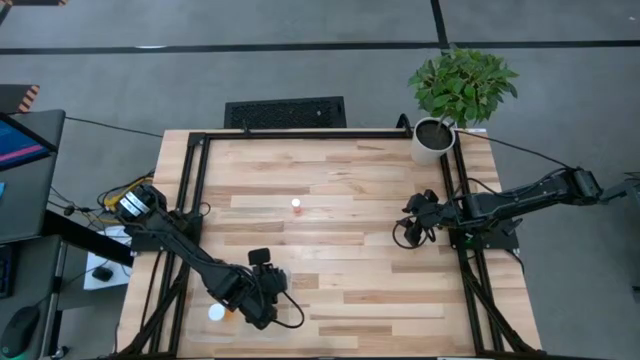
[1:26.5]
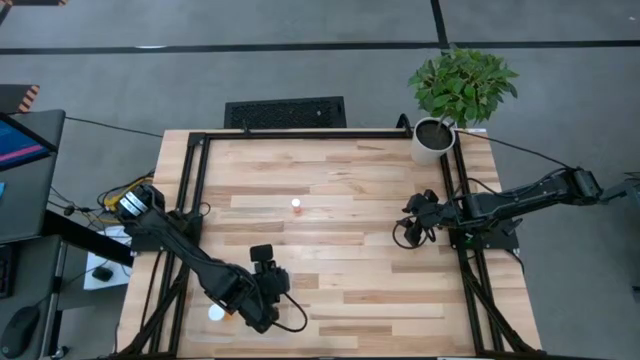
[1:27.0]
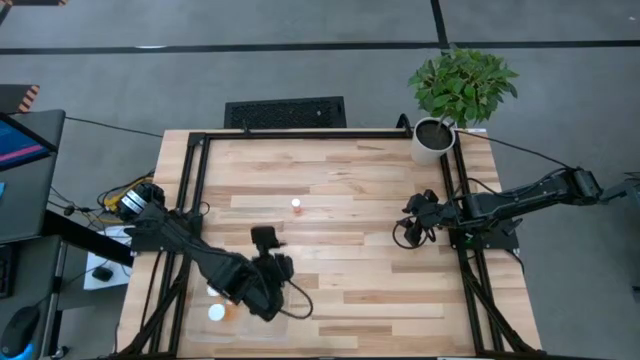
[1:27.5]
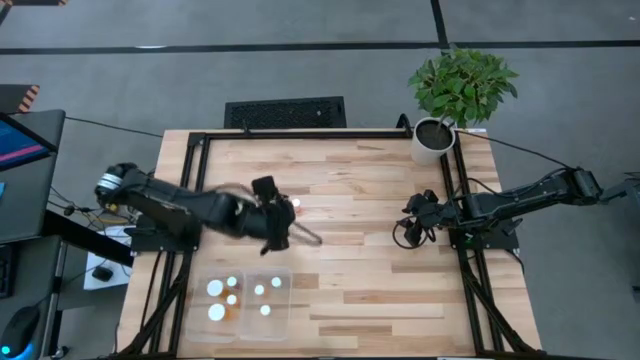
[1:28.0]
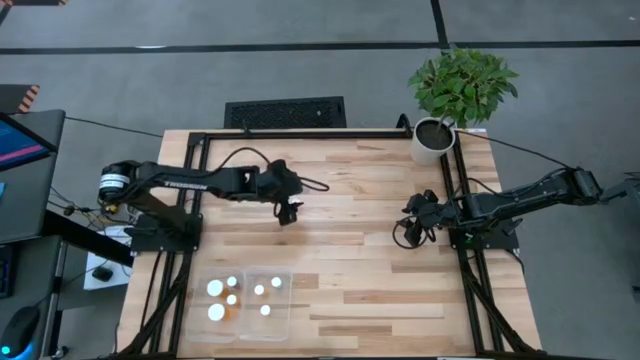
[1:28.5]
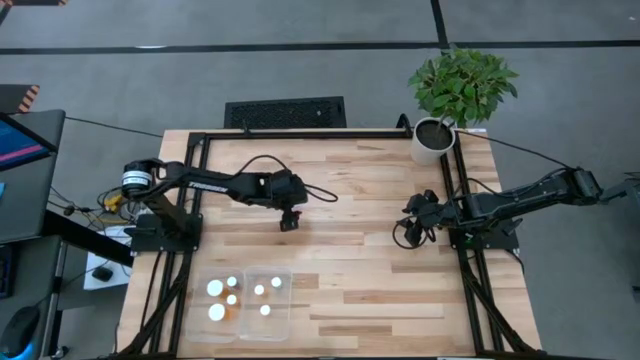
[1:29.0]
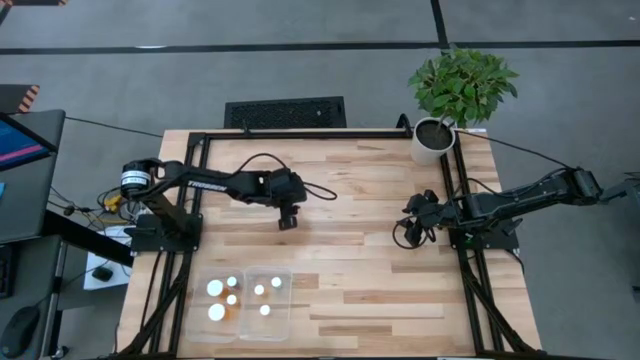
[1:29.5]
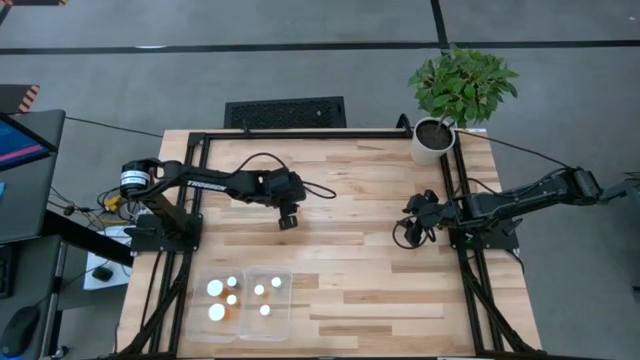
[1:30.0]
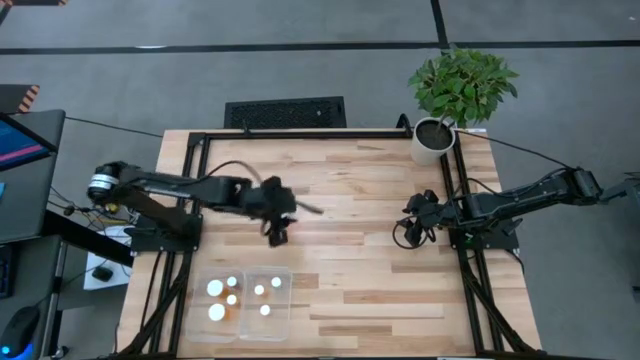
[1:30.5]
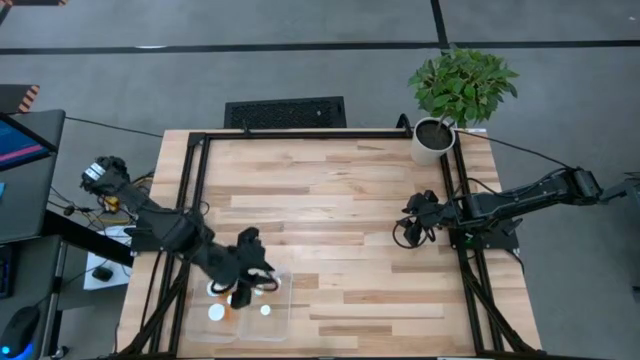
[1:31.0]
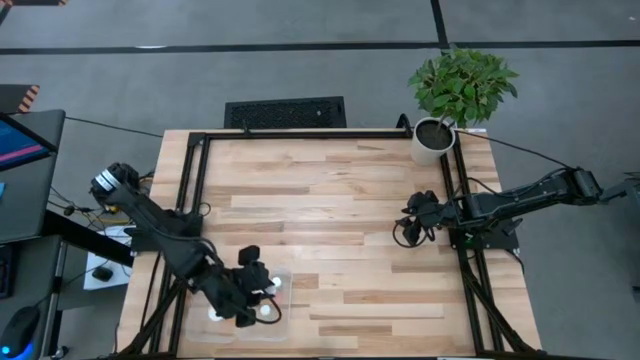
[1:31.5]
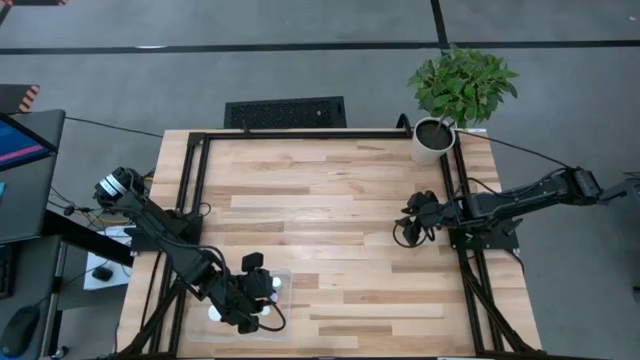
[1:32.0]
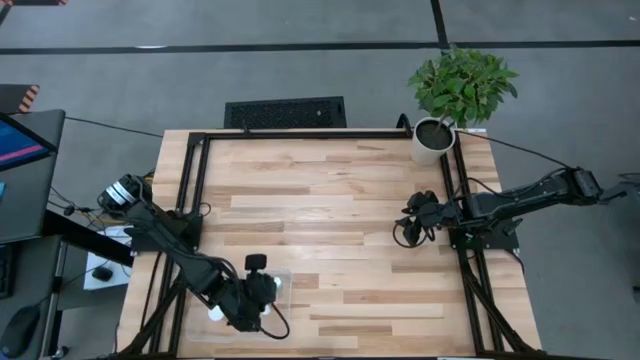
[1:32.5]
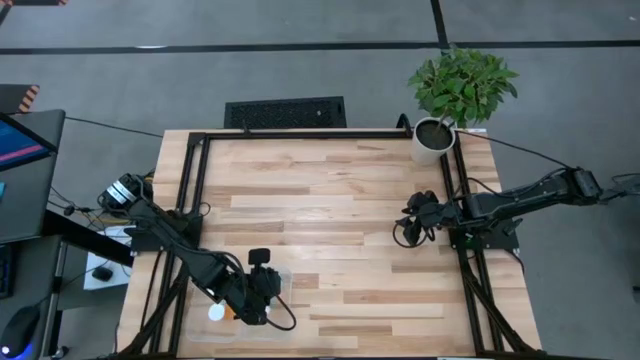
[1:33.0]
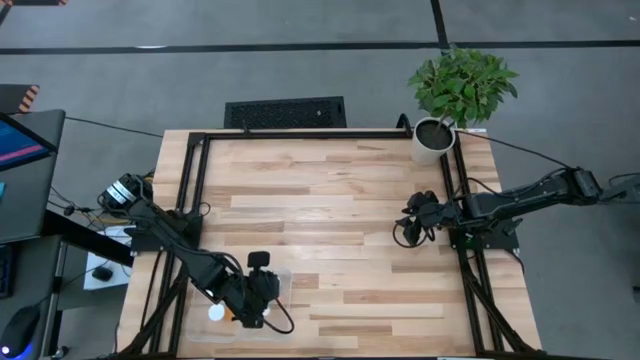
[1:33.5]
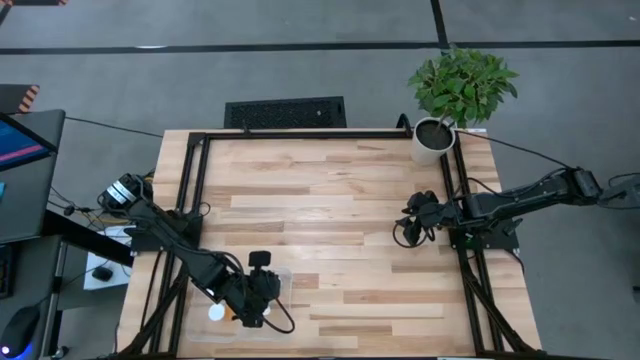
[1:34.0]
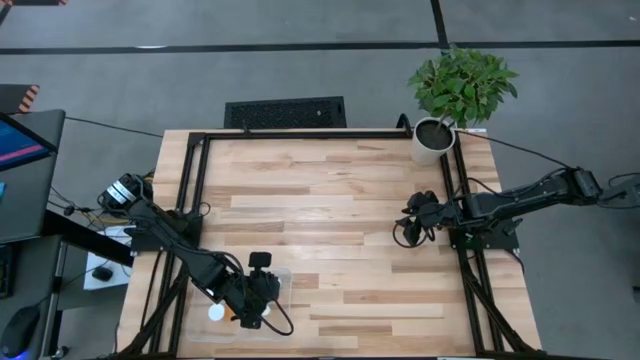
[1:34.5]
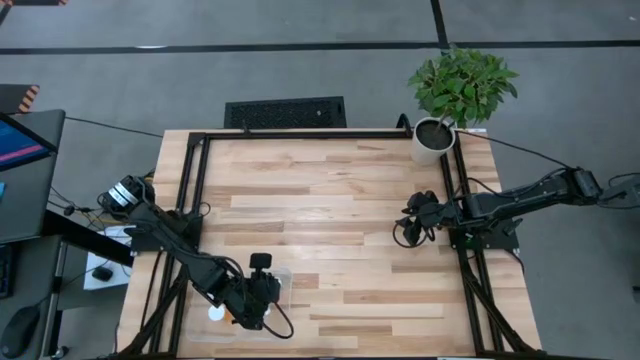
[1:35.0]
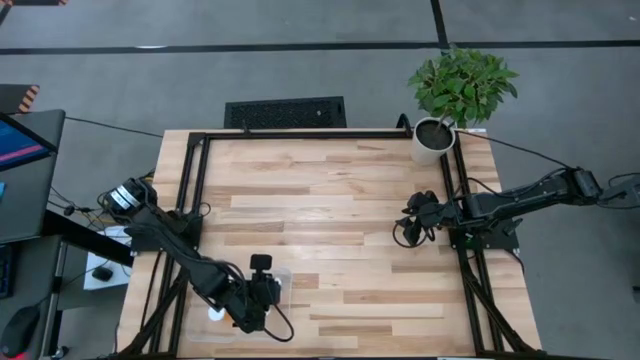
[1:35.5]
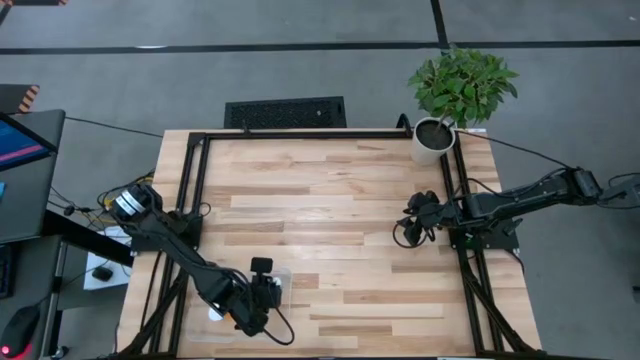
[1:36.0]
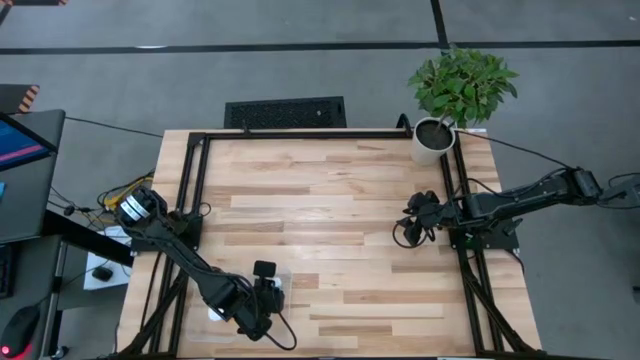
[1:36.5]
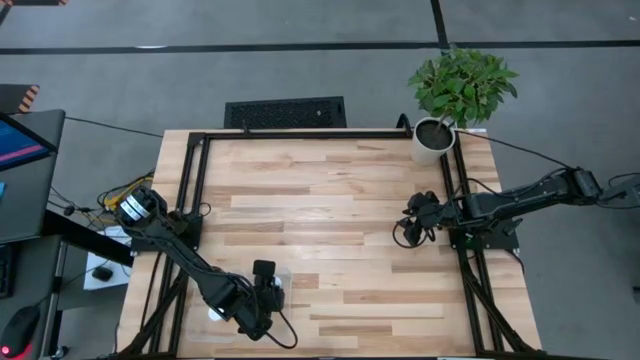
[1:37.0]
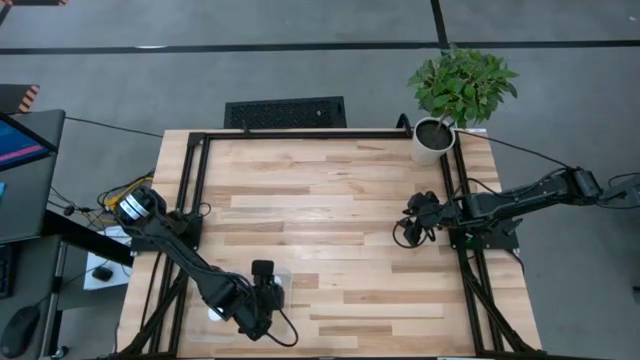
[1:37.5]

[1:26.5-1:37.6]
Task: Pick and place medicine bottles into bin by pill shape (circle, oval)
Put the red pill bottle into the right transparent bin

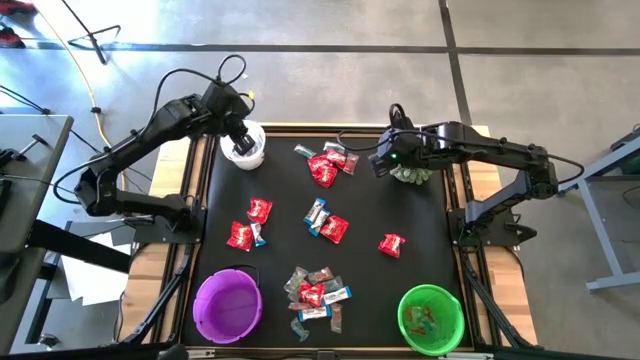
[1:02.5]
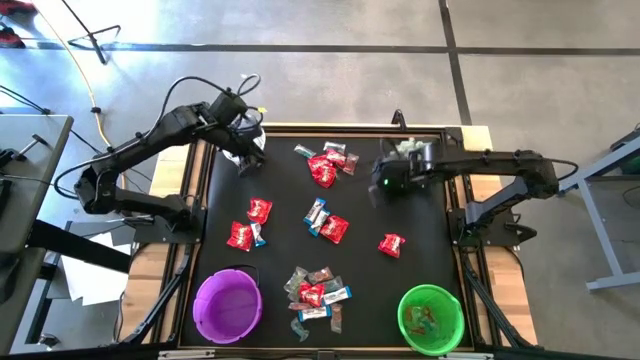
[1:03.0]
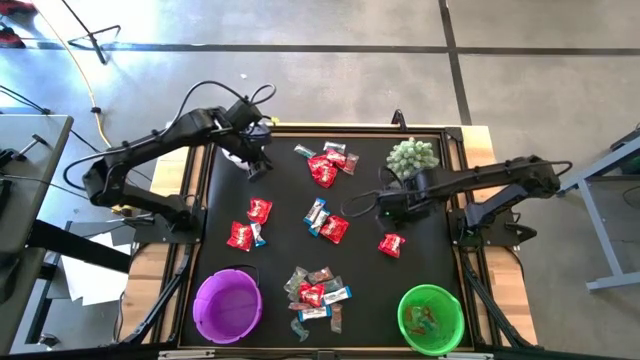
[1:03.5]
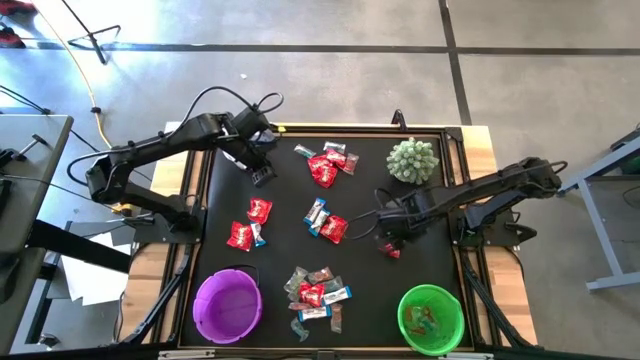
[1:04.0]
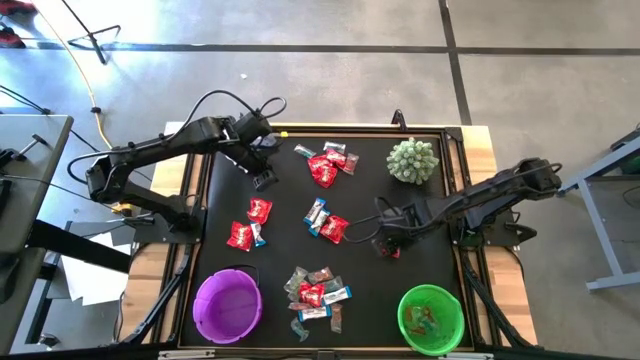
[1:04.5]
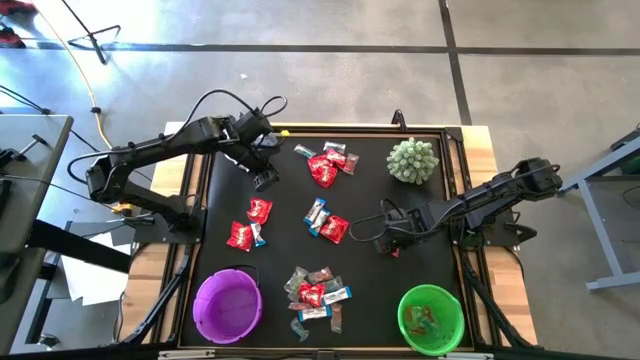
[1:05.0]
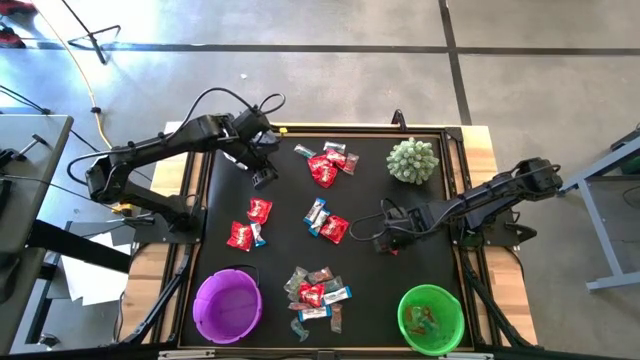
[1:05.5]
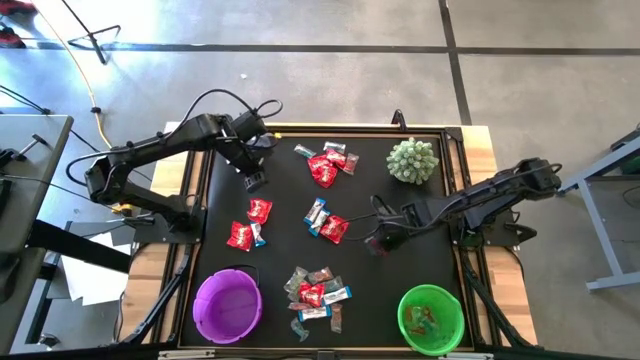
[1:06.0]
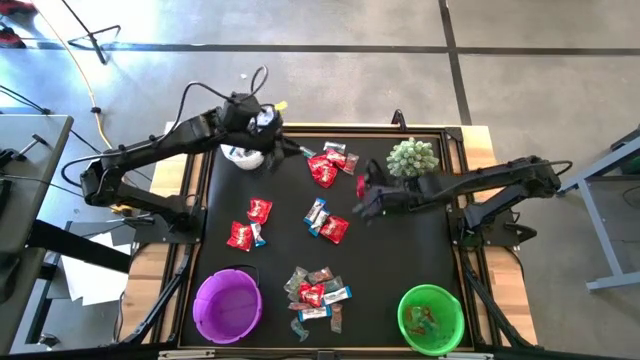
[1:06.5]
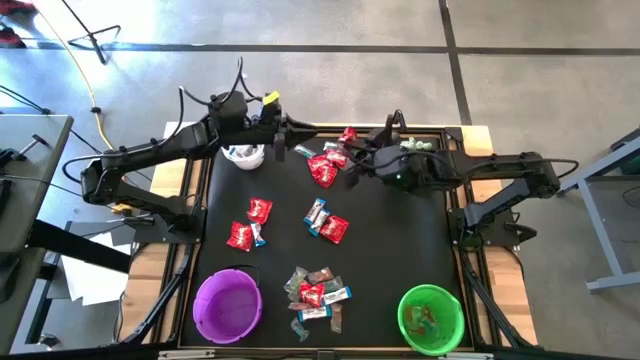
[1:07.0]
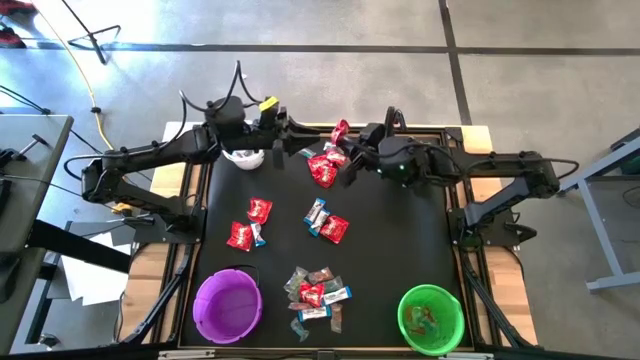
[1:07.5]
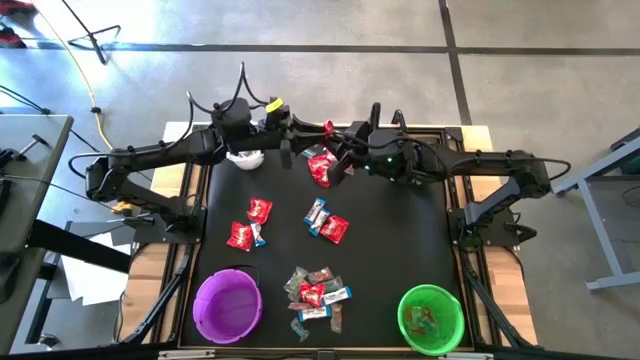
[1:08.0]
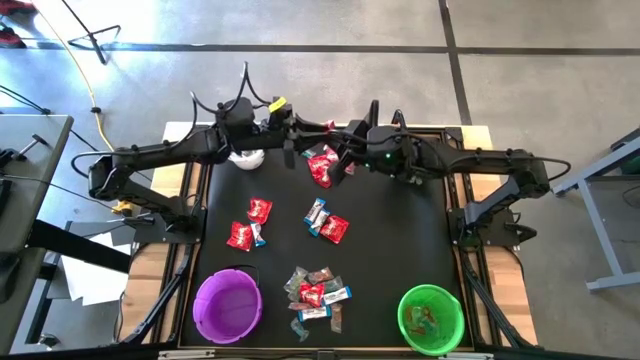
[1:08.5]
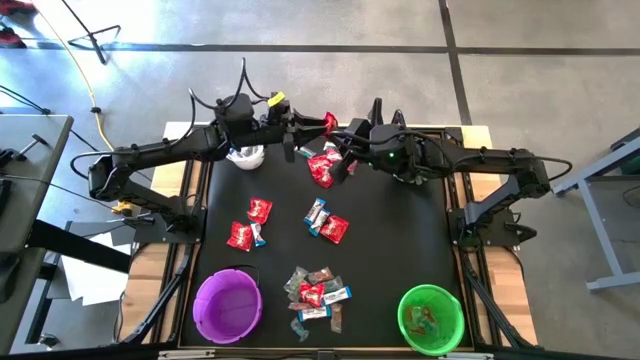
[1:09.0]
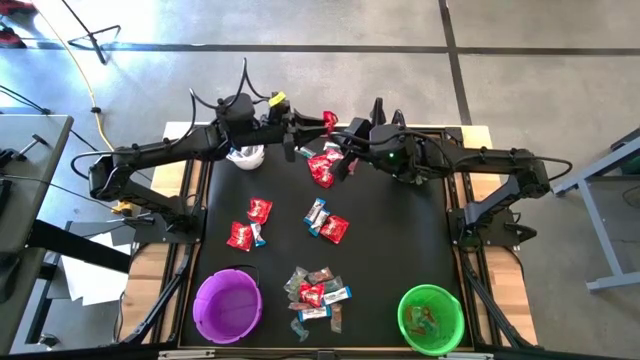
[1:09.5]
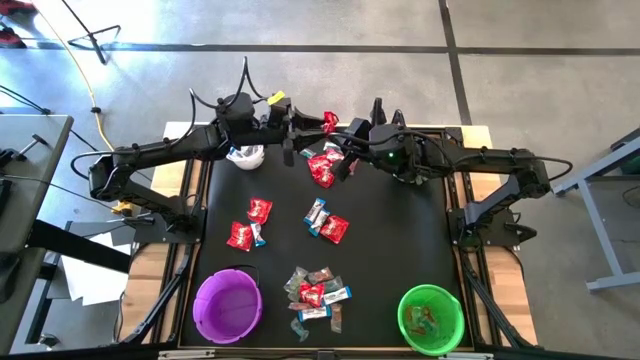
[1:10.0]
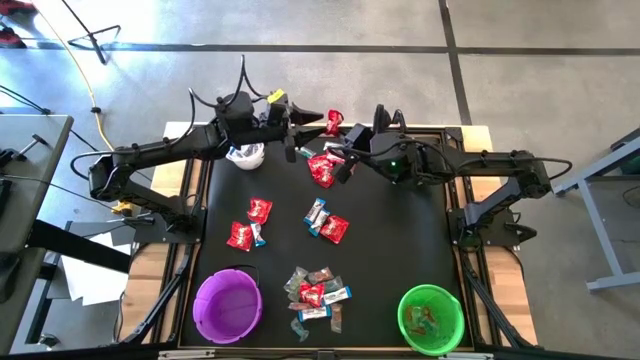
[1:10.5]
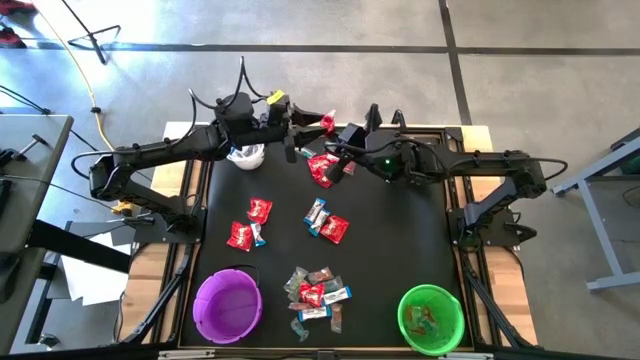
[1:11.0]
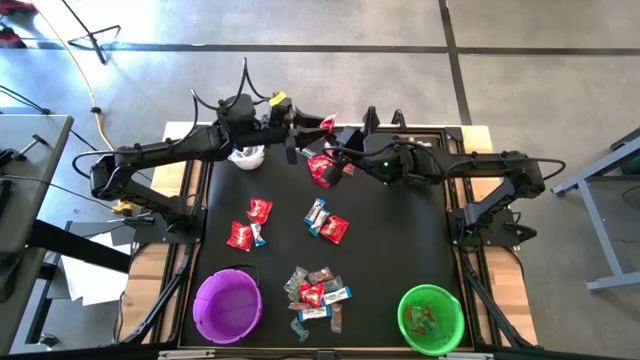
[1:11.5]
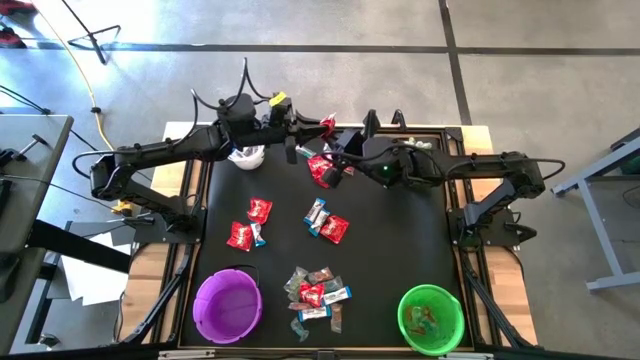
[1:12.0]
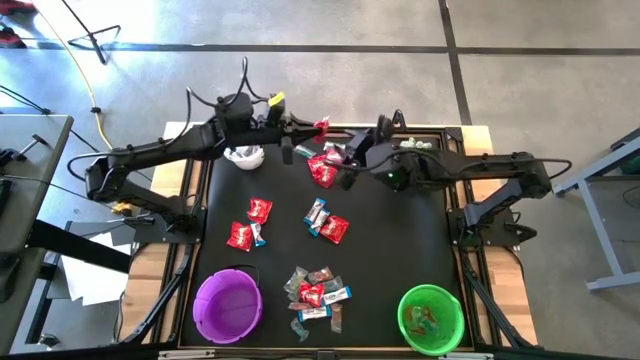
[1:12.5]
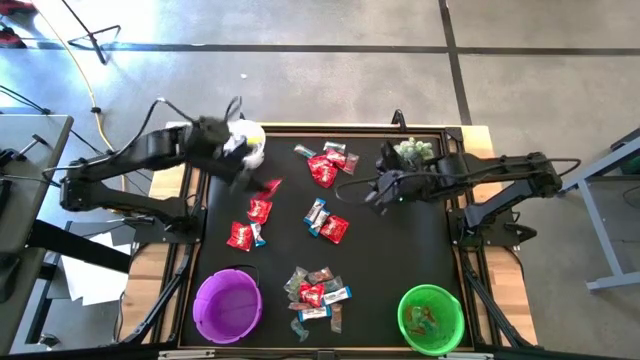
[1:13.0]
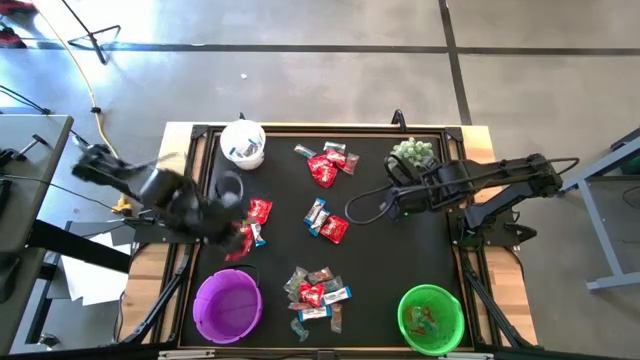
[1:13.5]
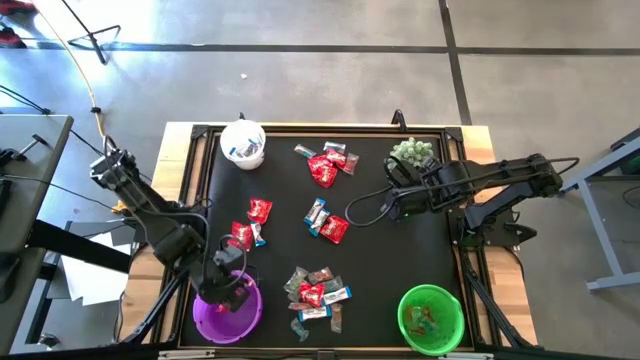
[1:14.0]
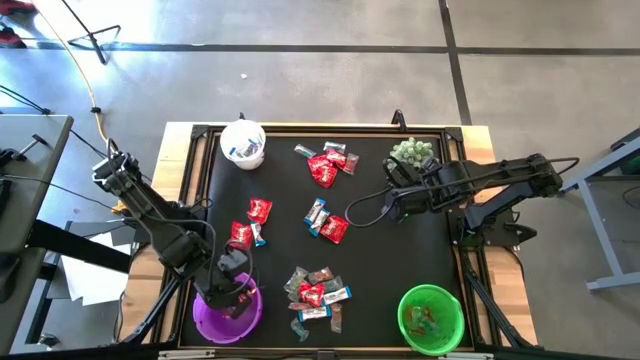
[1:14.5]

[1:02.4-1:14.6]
Task: Sort candy
Put the red candy into the violet bucket
